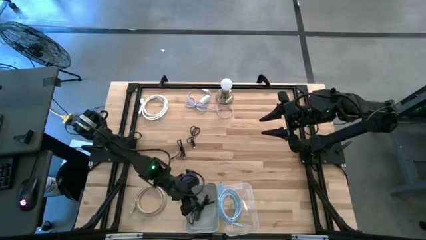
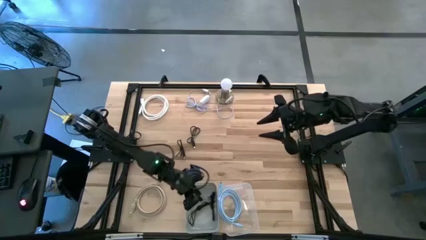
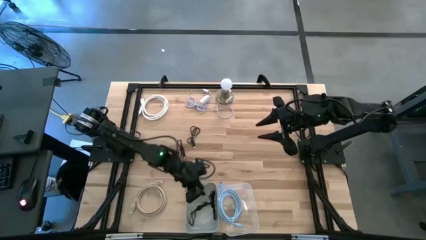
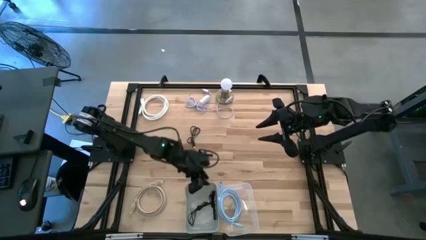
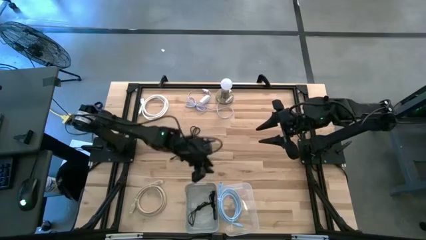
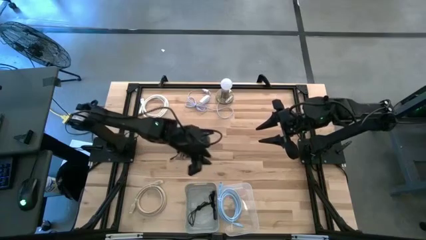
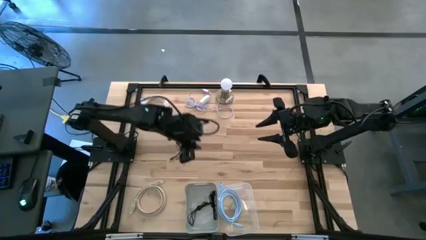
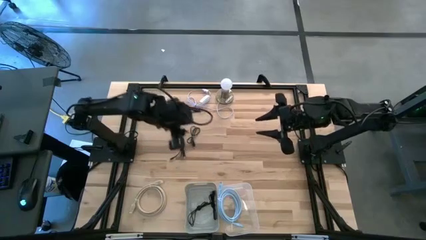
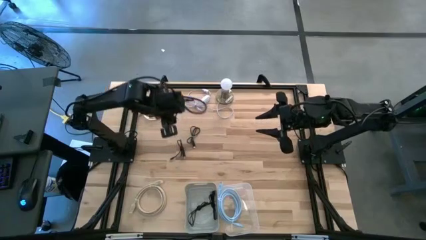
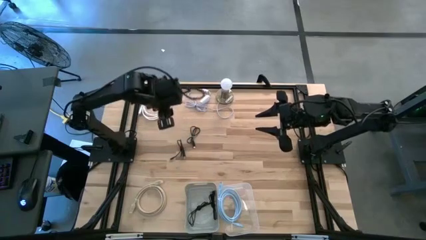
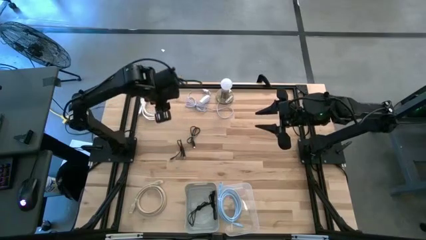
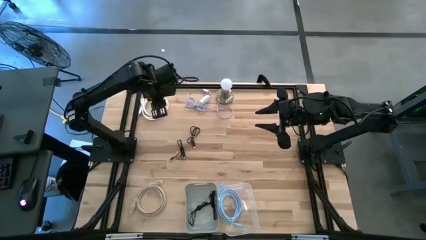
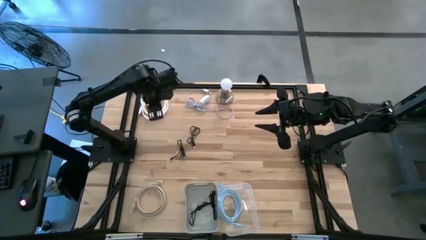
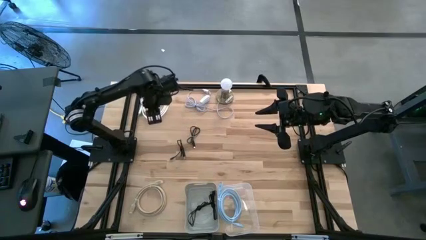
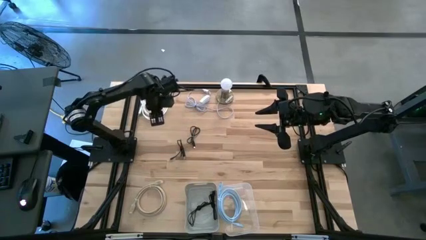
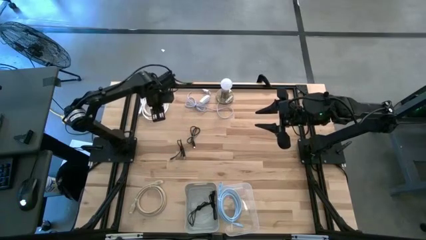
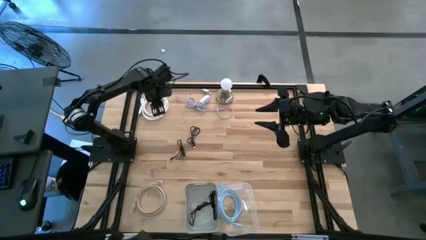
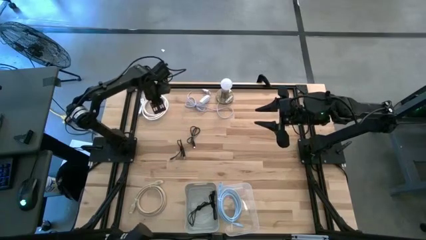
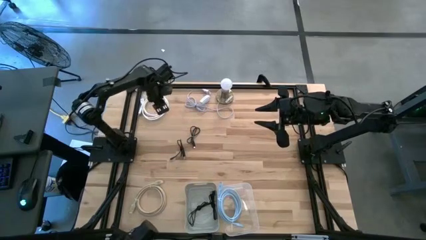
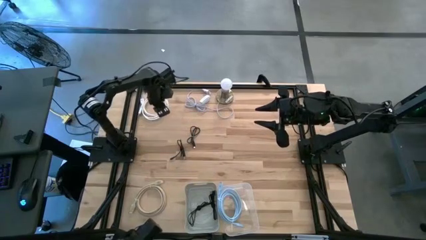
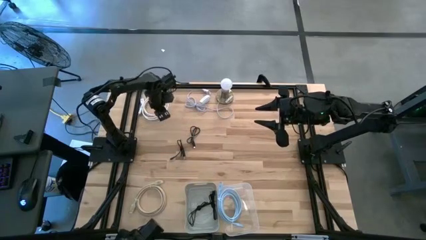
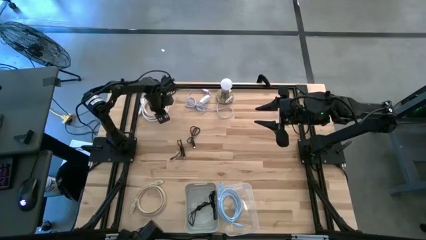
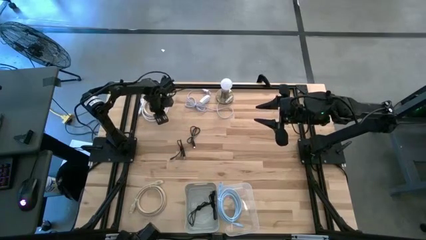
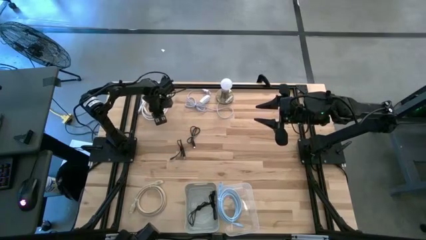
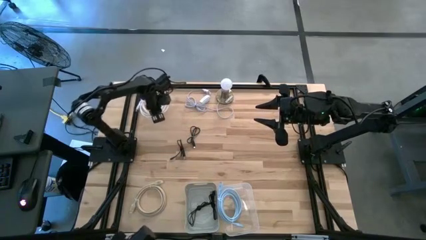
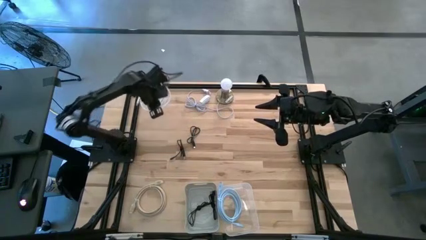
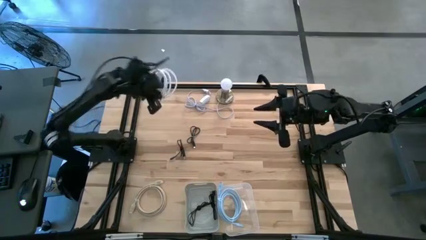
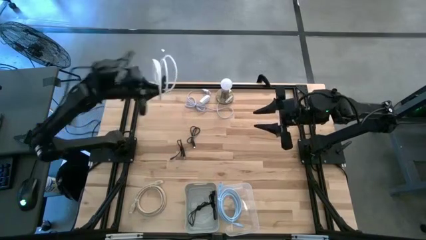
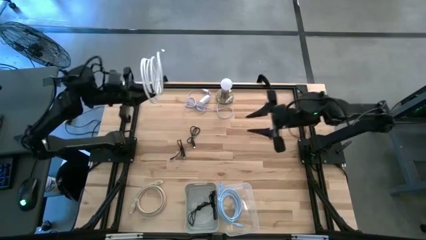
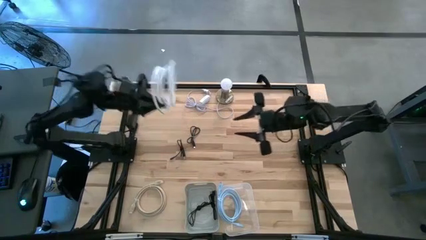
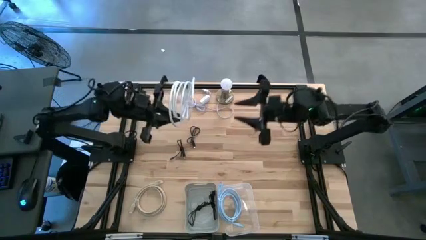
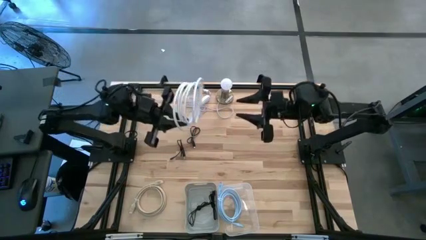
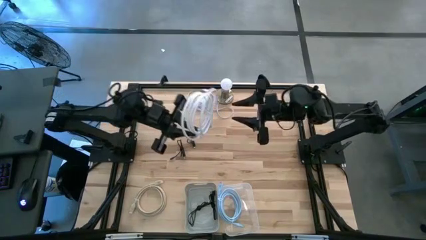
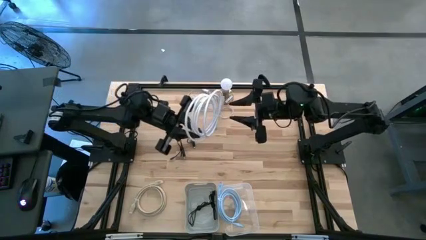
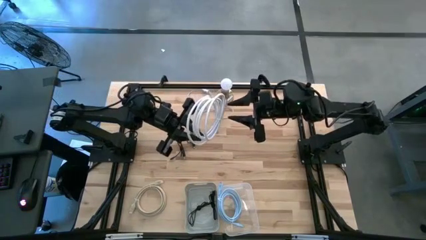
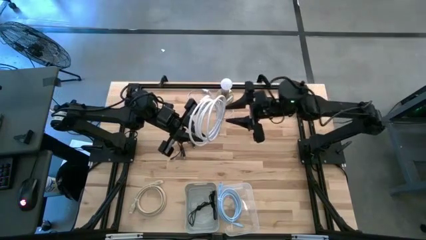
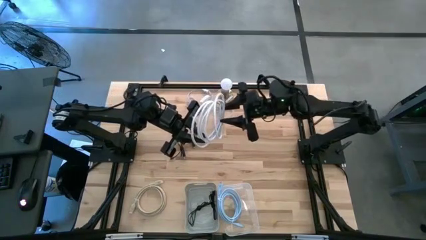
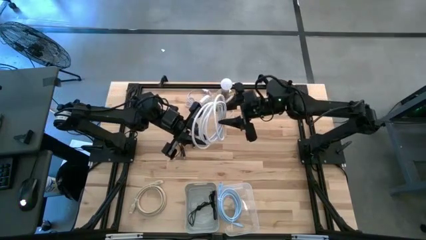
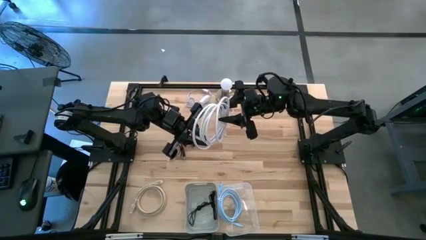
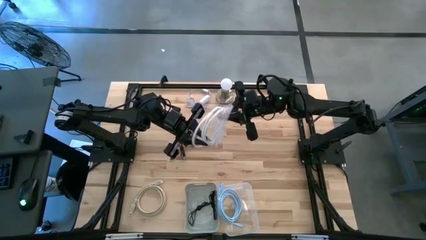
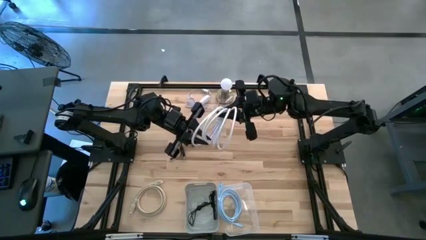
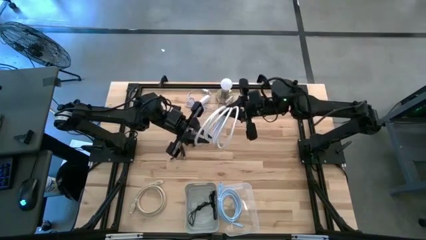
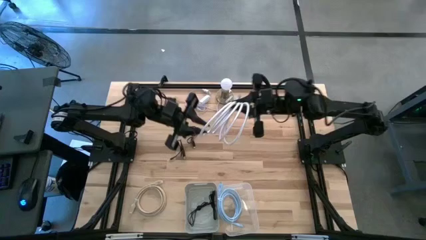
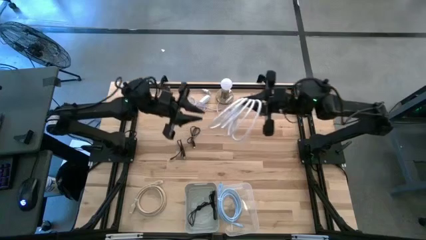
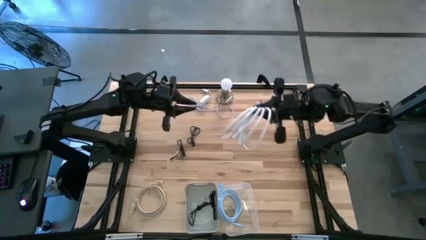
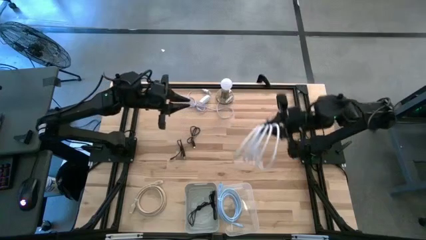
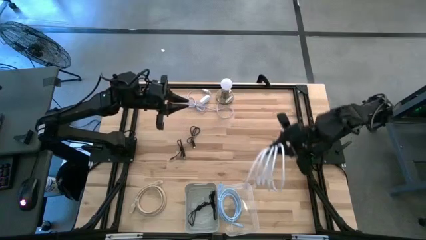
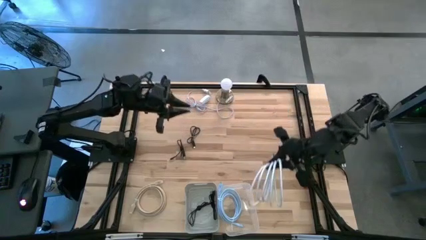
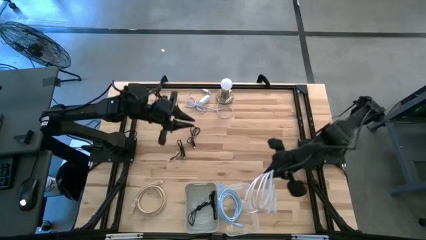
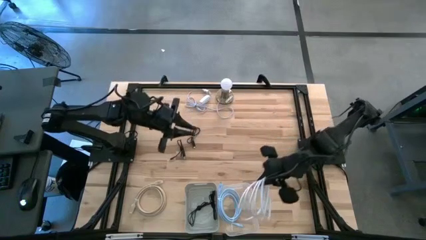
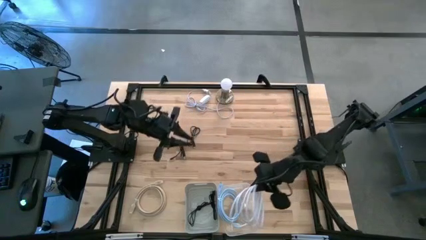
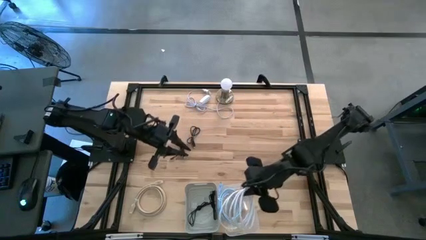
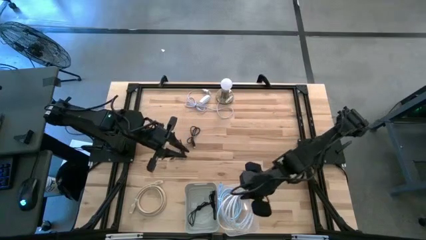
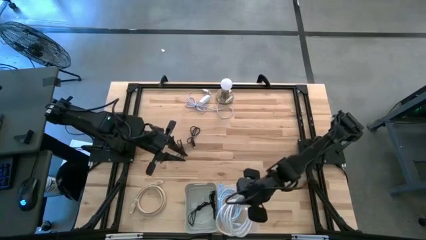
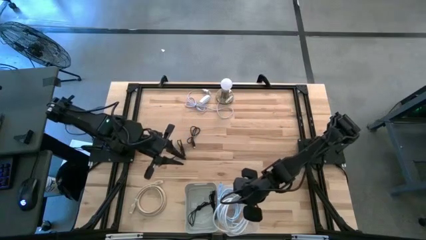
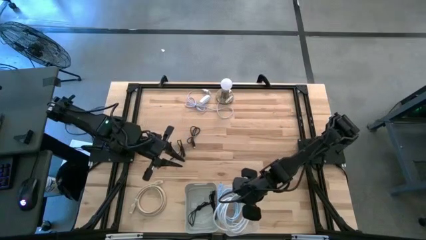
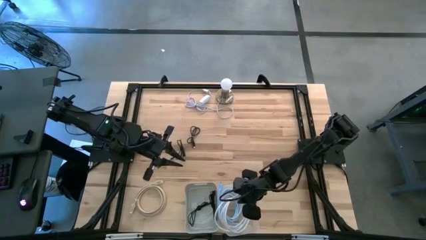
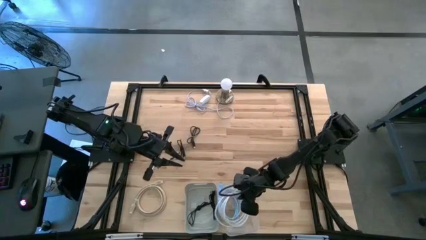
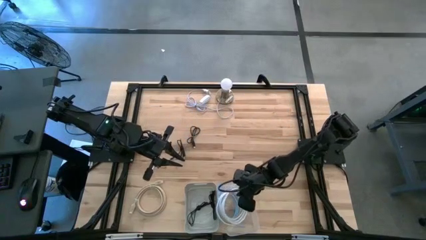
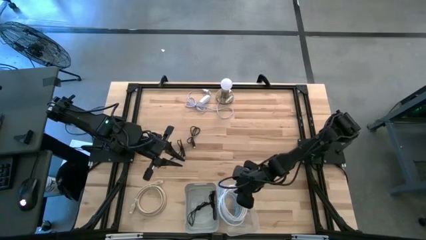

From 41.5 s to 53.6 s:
Task: Pick & Place USB Port
Put the white HDMI cable into the transparent bin
